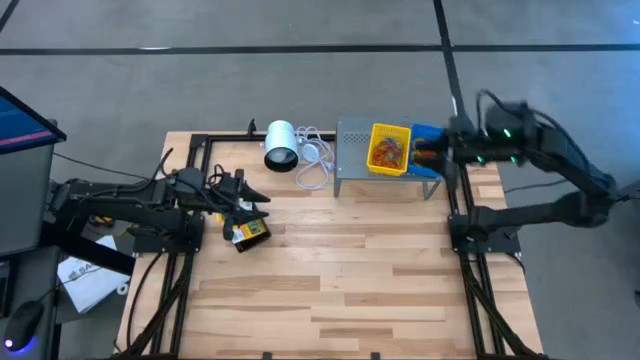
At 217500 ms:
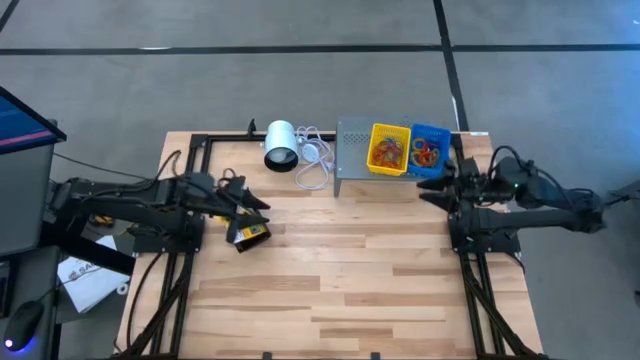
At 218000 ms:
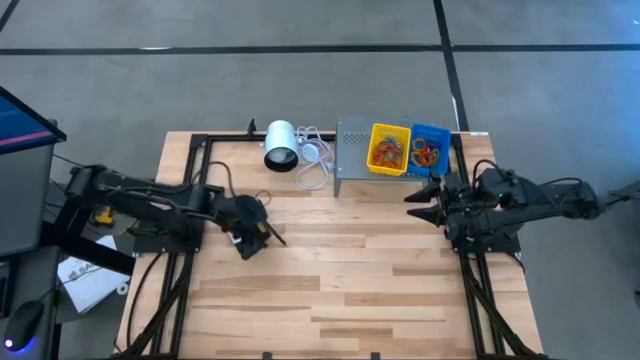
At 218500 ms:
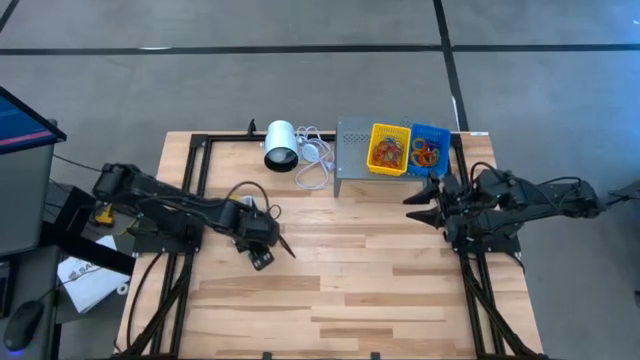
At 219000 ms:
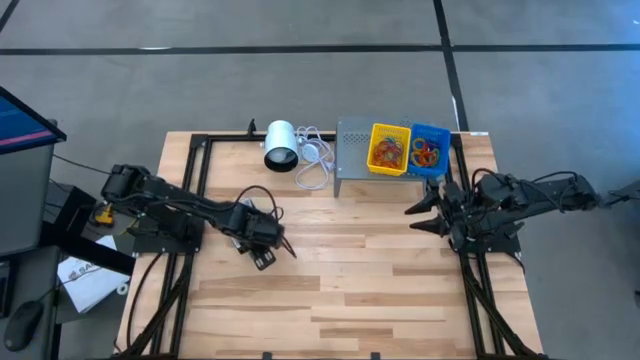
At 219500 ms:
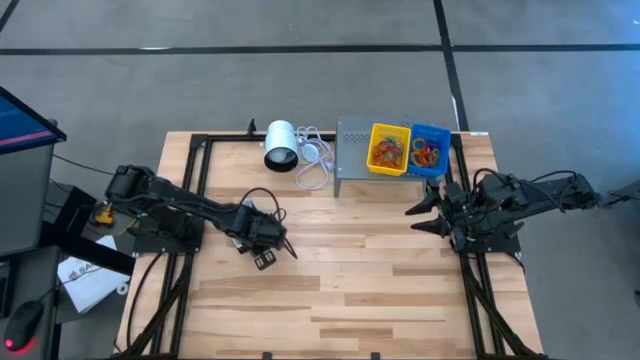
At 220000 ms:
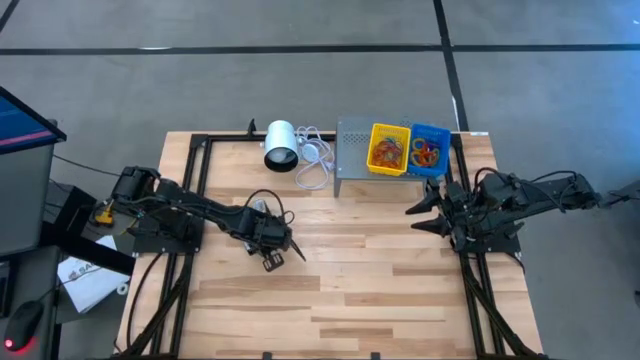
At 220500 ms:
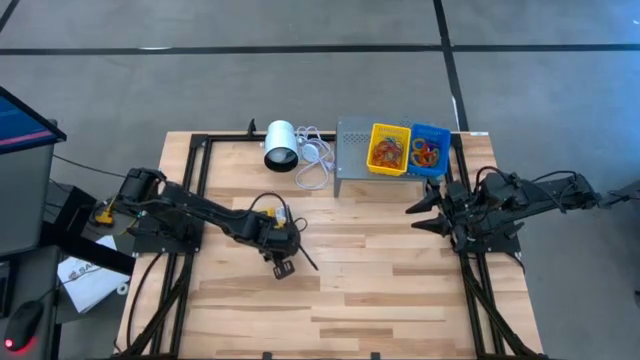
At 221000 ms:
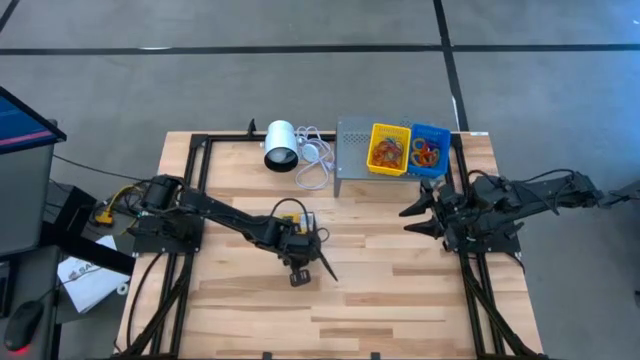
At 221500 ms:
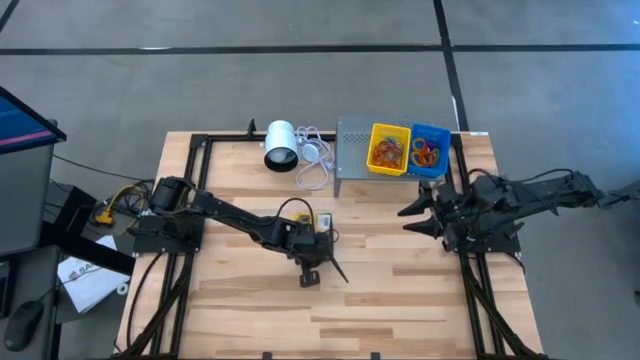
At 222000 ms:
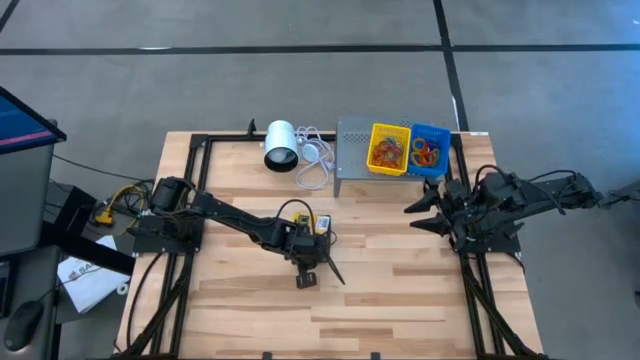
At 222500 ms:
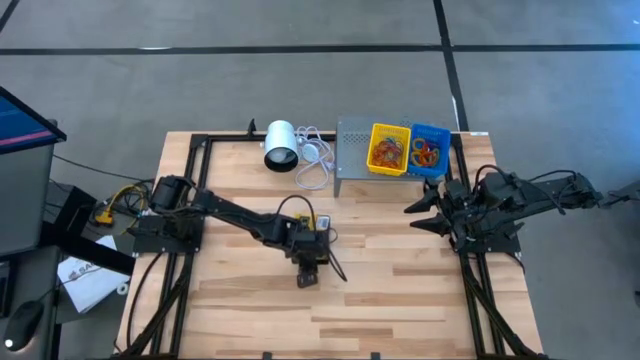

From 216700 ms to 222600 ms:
Task: Pick & Place Office Desk Supplies
Move the black basket filled with crayons to the center of the table

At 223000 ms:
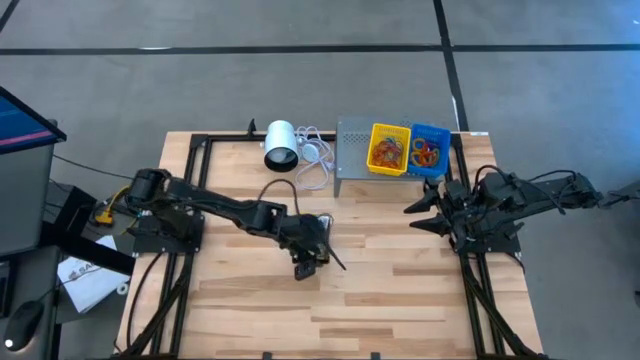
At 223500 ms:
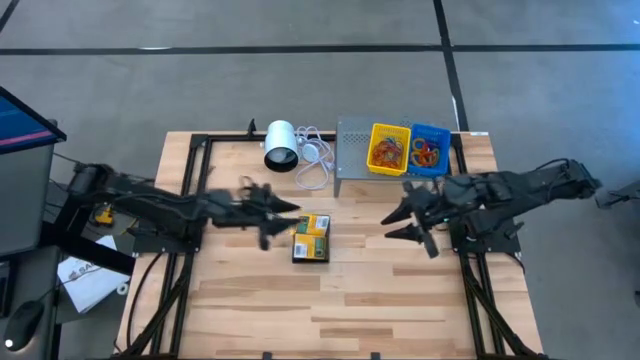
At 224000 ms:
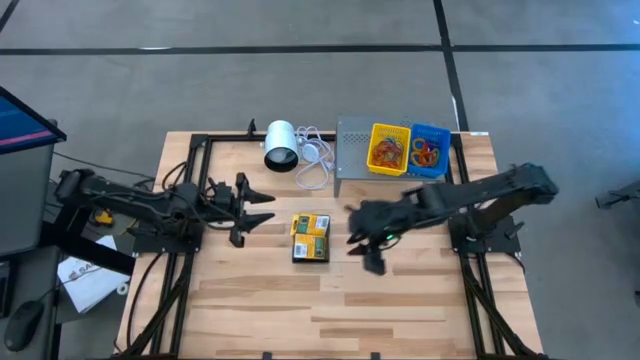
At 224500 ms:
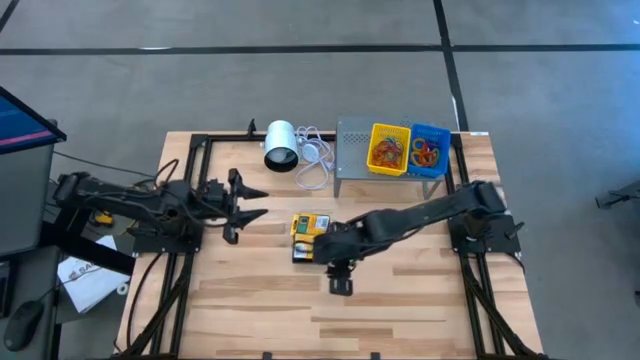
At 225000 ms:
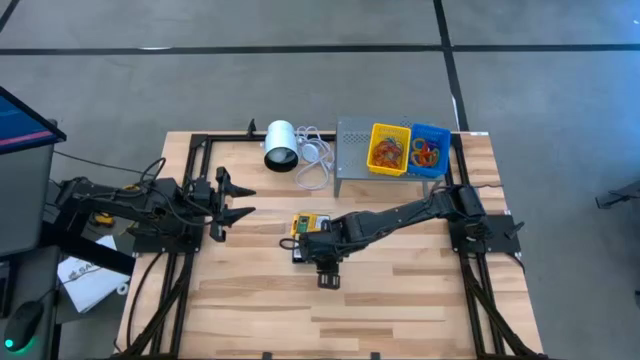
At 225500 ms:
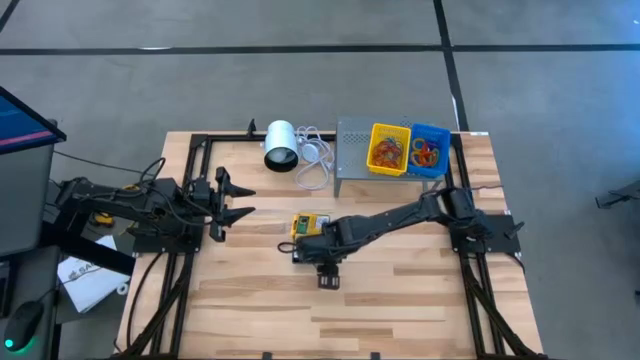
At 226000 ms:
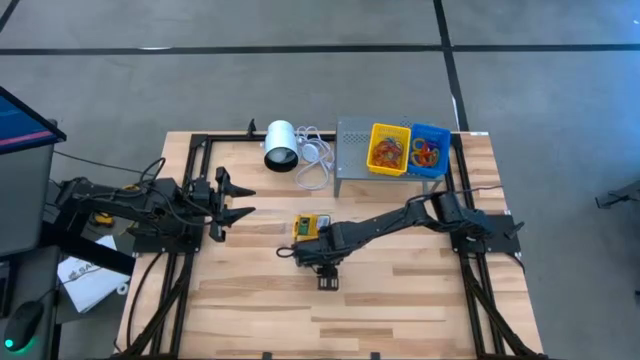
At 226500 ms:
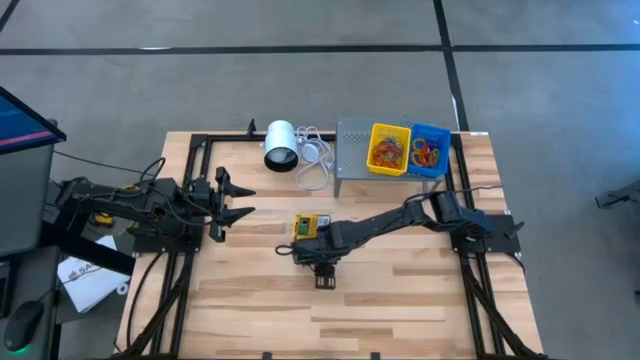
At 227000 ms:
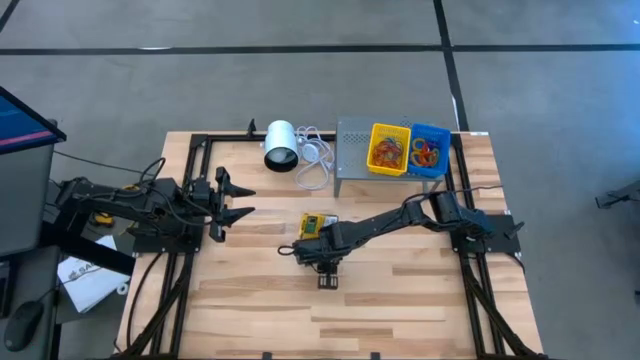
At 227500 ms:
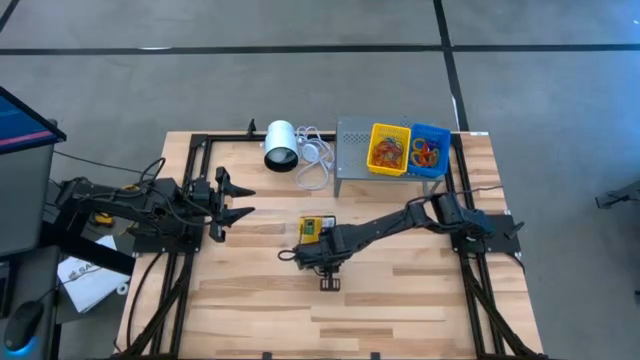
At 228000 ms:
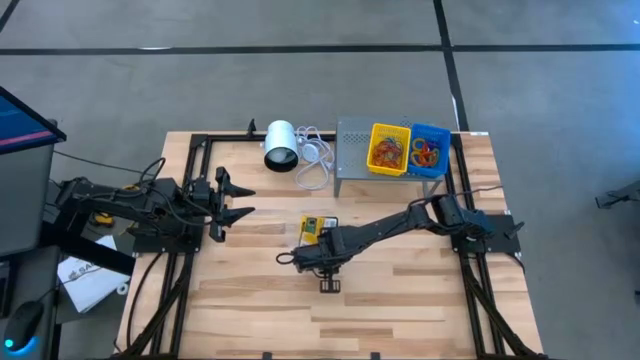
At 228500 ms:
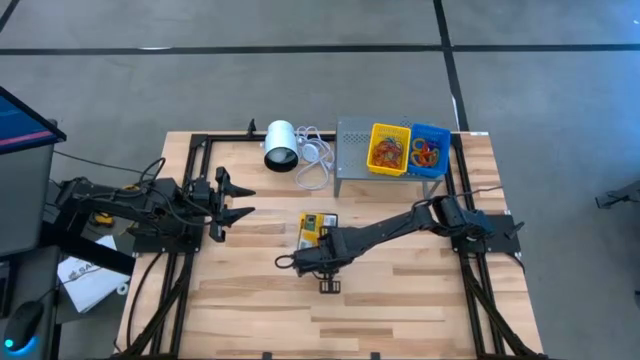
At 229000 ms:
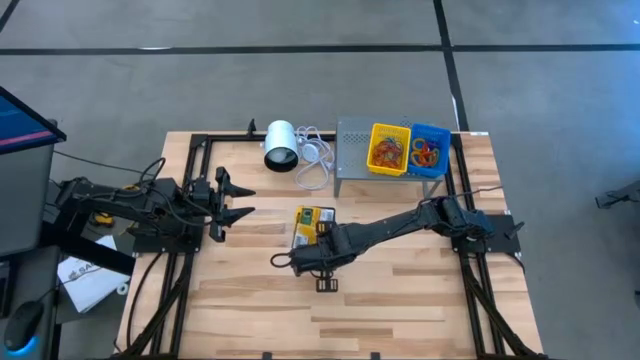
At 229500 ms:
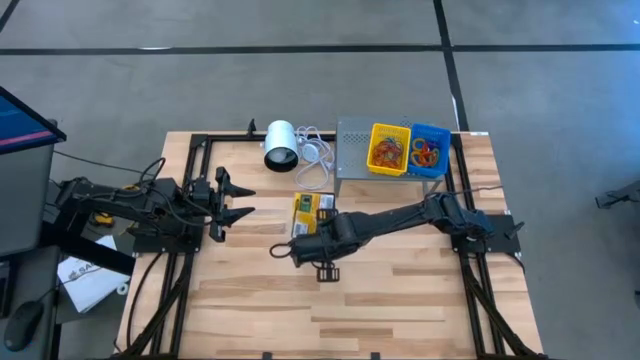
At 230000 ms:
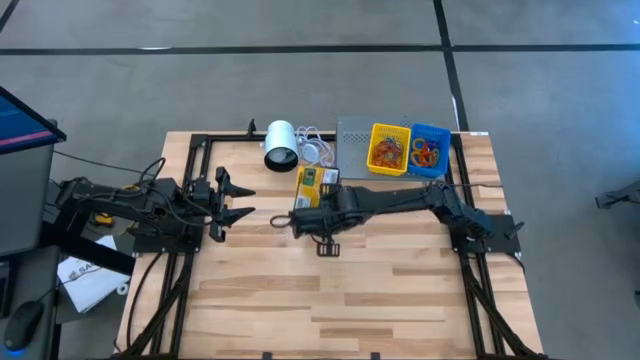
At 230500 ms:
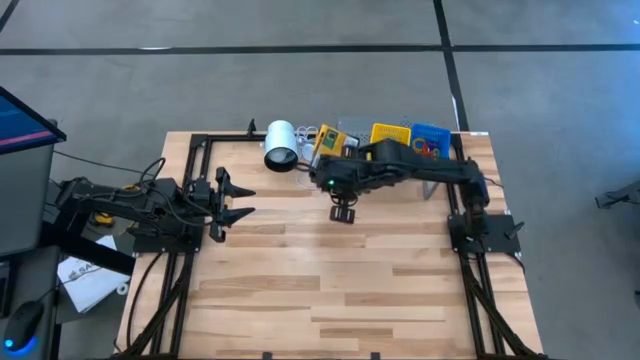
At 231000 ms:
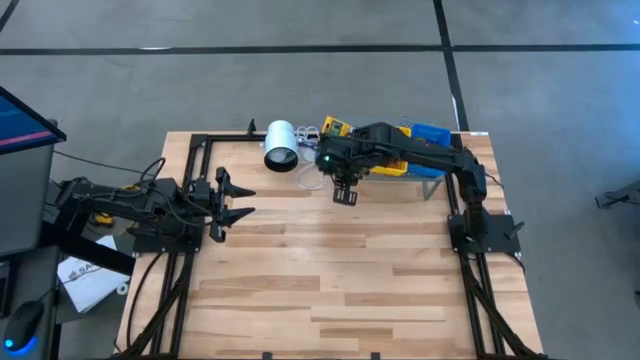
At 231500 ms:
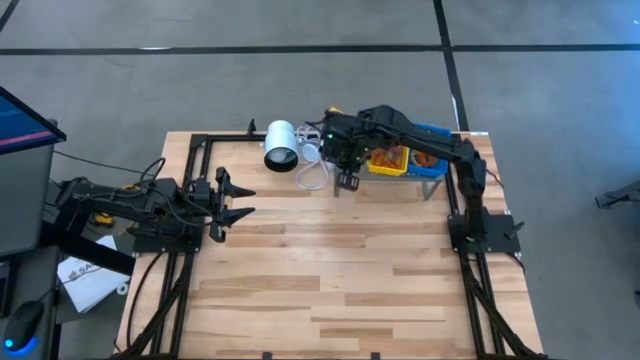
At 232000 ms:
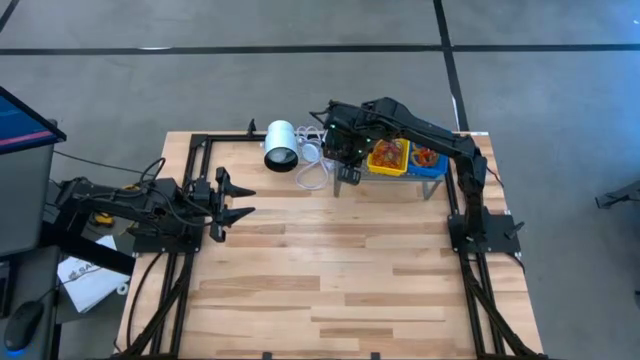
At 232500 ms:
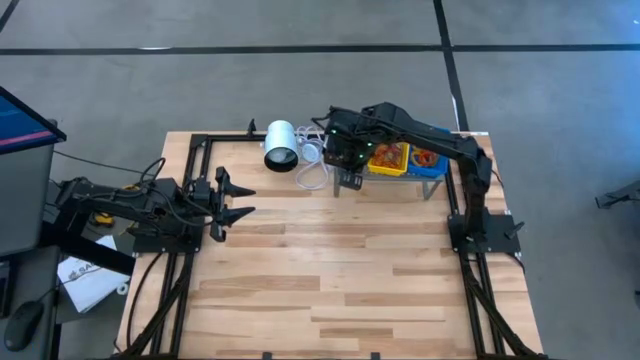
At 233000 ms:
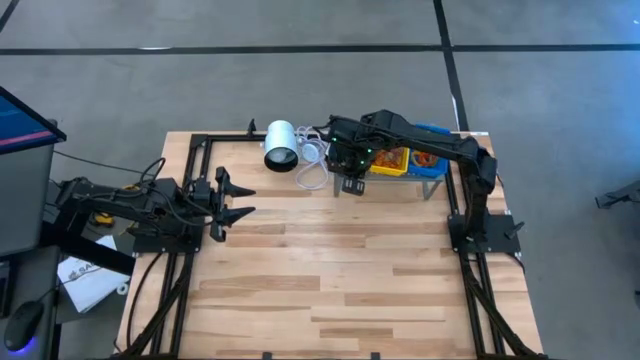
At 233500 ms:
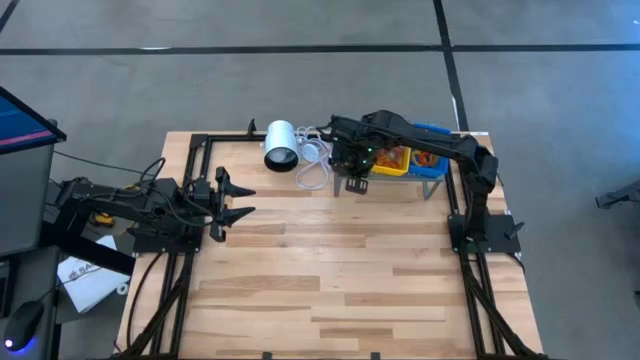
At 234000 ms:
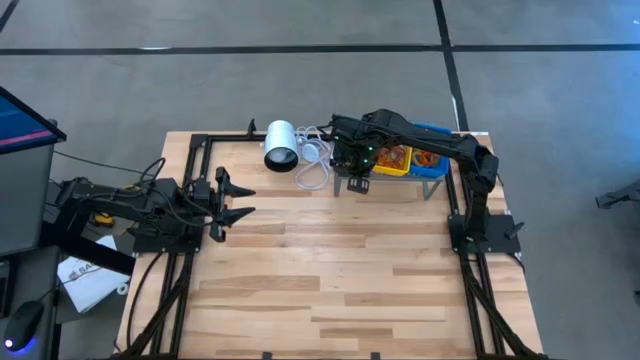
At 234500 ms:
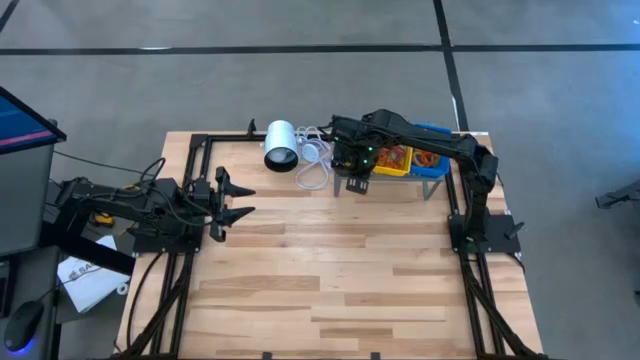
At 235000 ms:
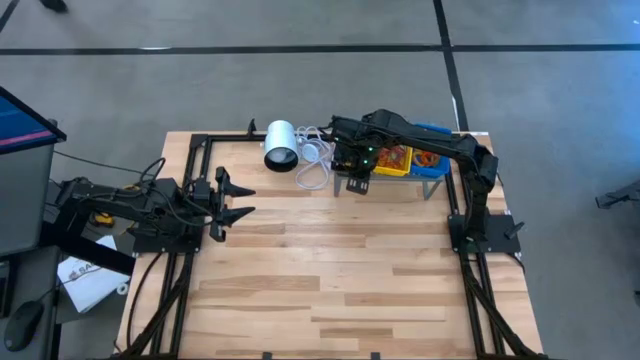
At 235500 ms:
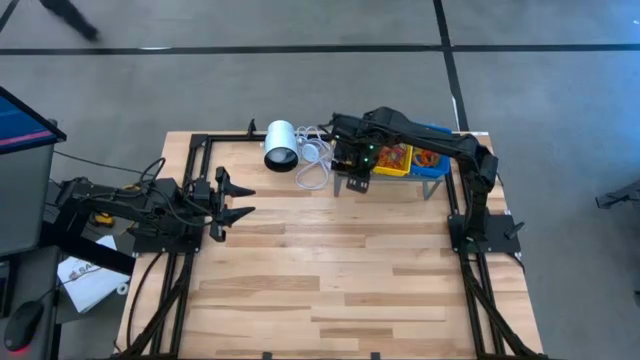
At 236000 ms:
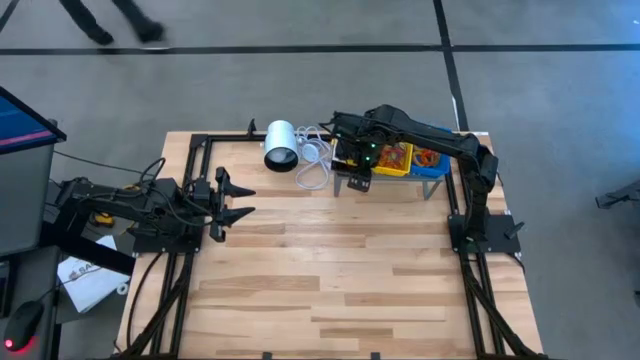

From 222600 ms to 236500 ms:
Put the black basket filled with crayons on the shelf

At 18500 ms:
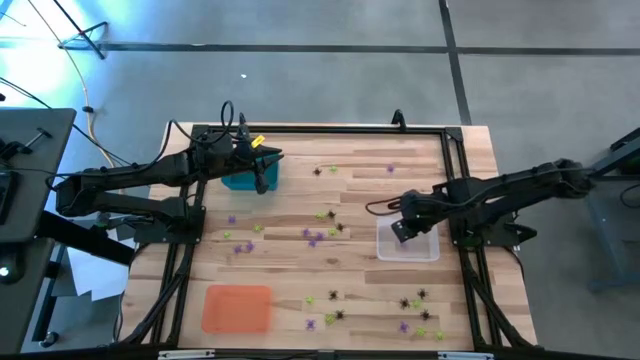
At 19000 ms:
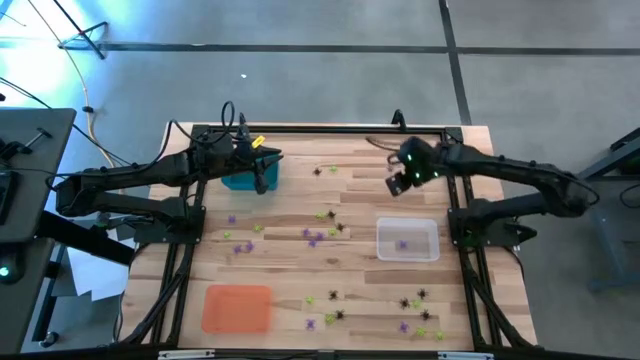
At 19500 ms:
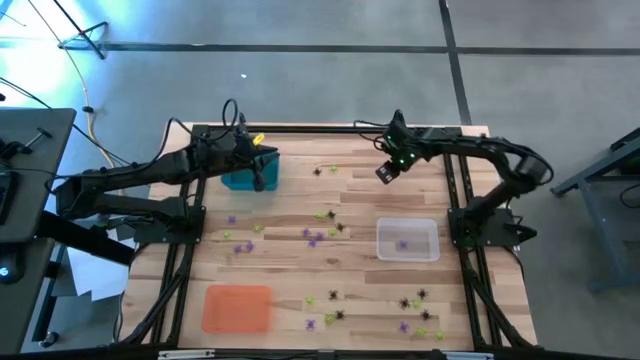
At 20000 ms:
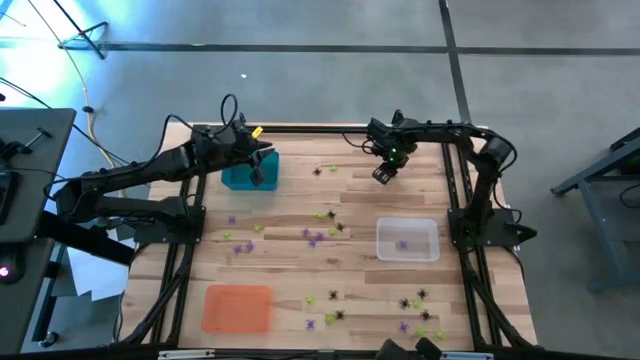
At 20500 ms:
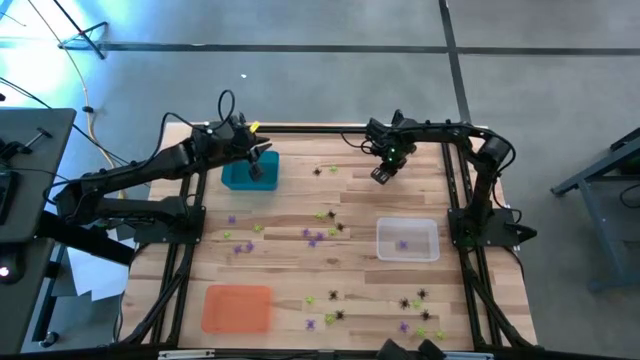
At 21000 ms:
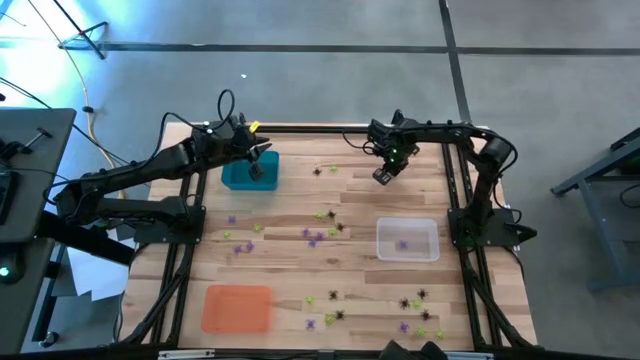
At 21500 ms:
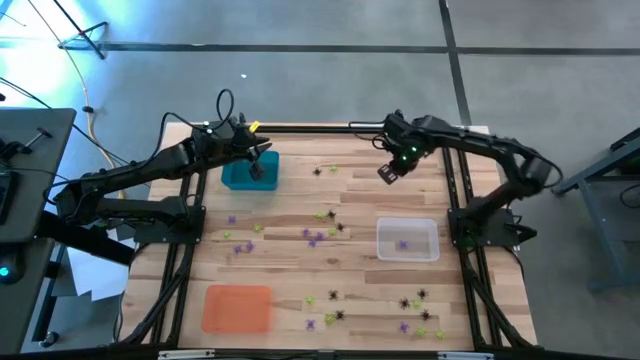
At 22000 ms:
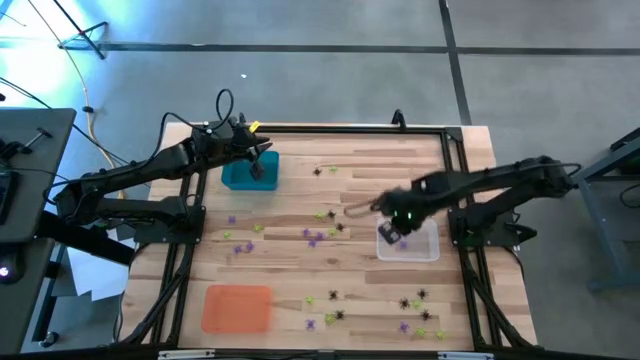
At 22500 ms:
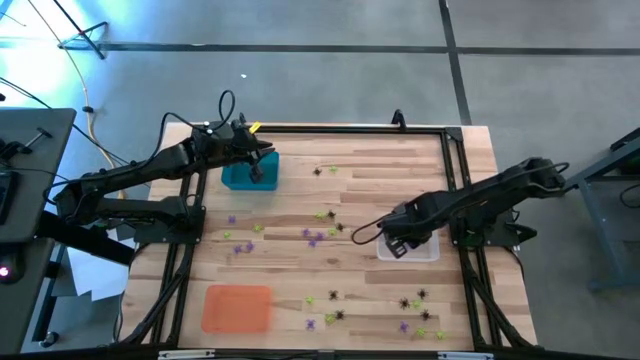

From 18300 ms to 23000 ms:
Task: Sort Halloween decoration
Put the violet spider toy into the transparent bin
